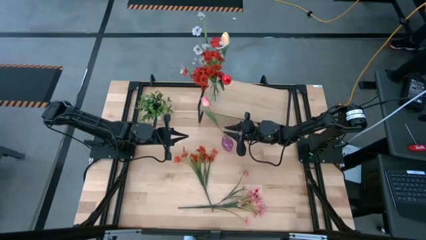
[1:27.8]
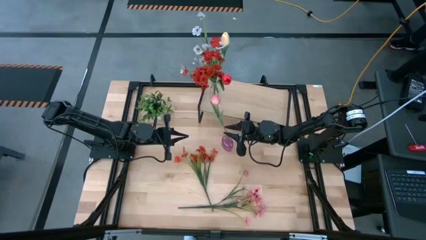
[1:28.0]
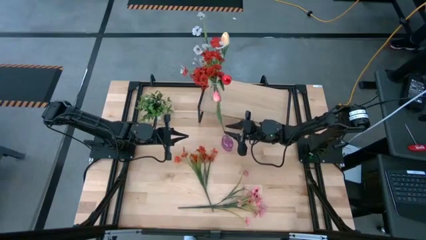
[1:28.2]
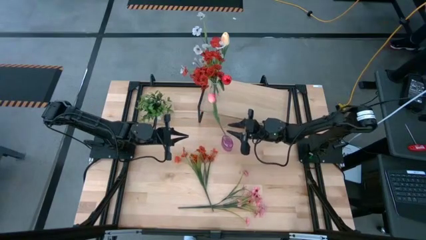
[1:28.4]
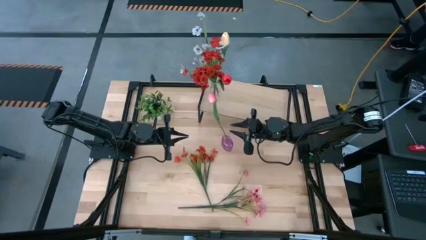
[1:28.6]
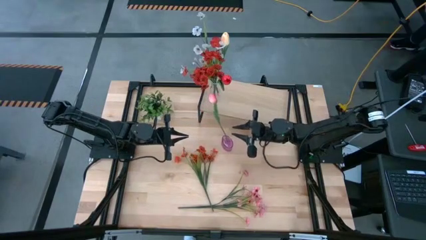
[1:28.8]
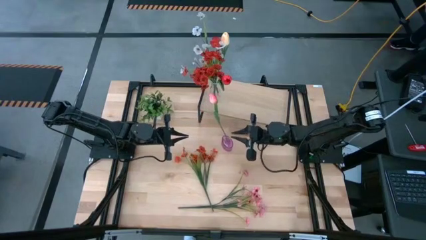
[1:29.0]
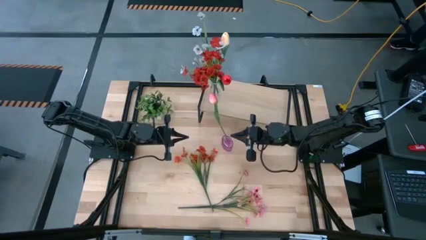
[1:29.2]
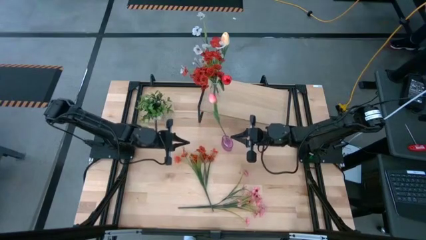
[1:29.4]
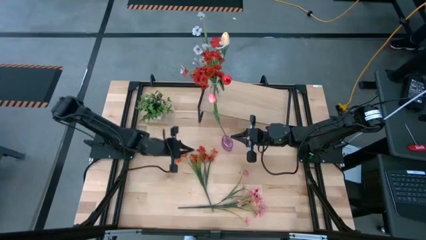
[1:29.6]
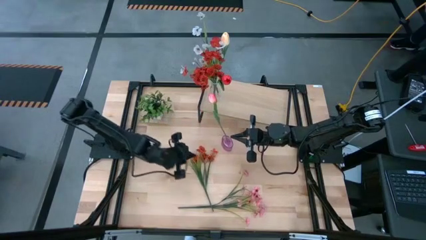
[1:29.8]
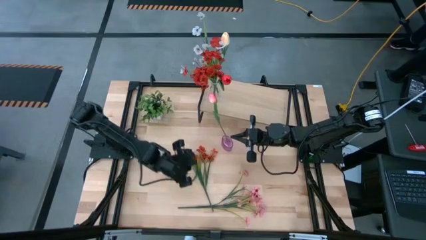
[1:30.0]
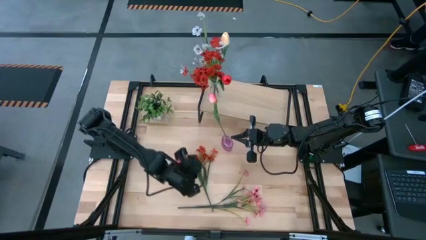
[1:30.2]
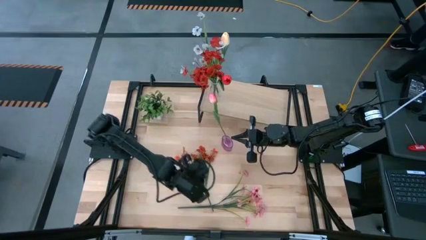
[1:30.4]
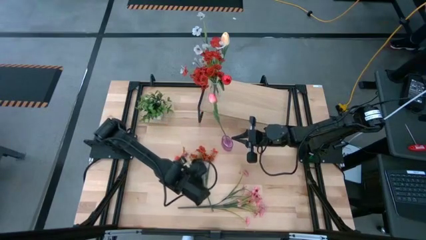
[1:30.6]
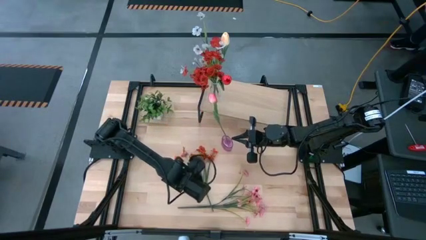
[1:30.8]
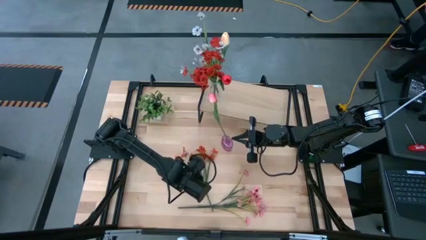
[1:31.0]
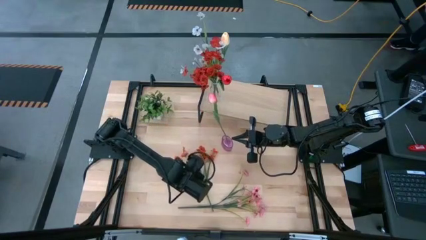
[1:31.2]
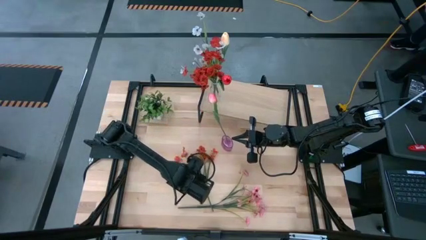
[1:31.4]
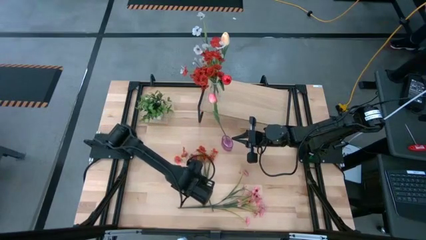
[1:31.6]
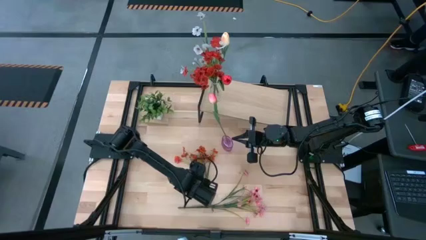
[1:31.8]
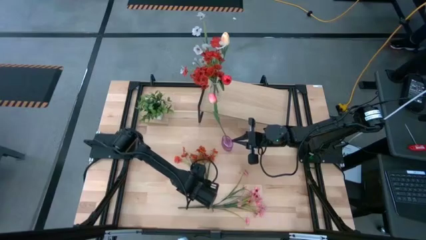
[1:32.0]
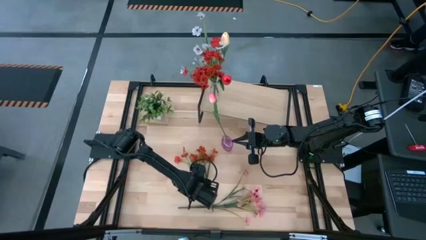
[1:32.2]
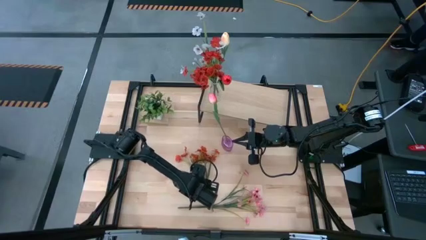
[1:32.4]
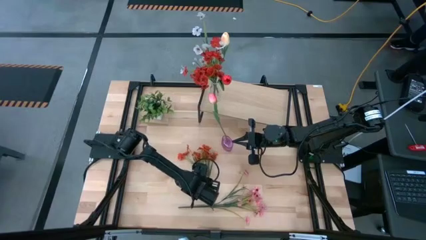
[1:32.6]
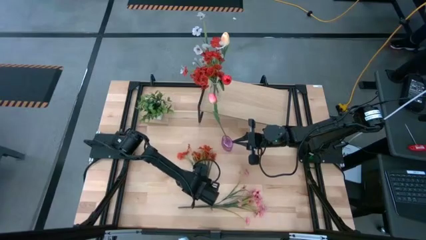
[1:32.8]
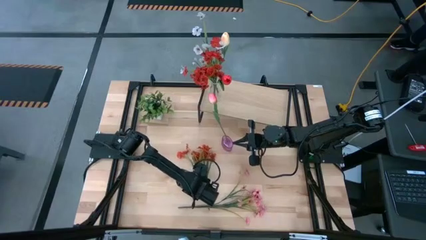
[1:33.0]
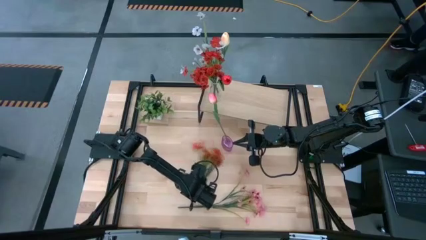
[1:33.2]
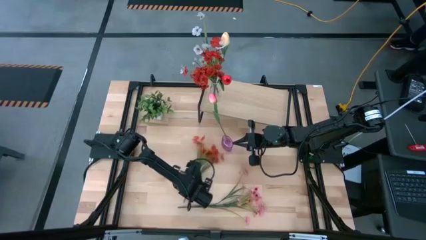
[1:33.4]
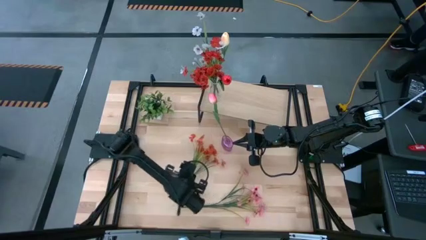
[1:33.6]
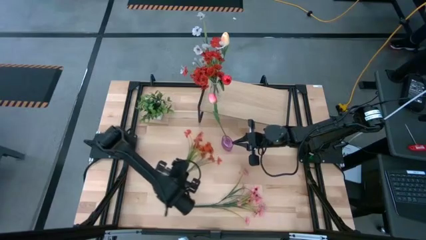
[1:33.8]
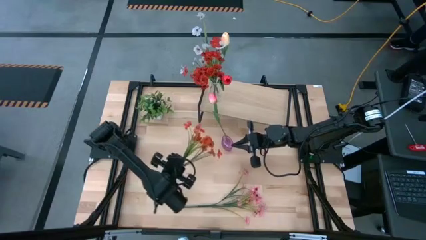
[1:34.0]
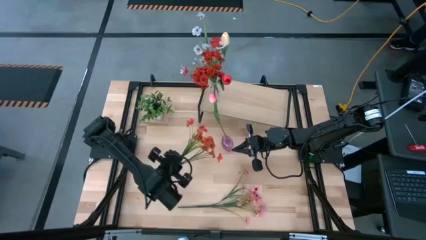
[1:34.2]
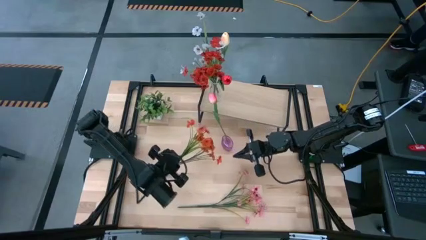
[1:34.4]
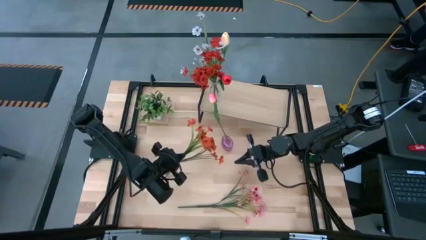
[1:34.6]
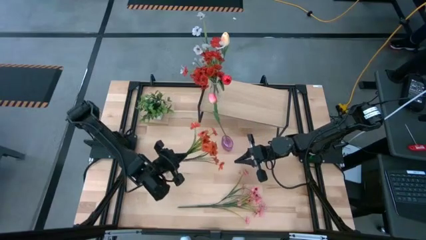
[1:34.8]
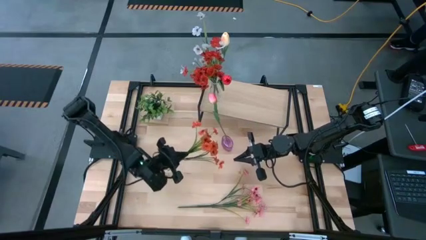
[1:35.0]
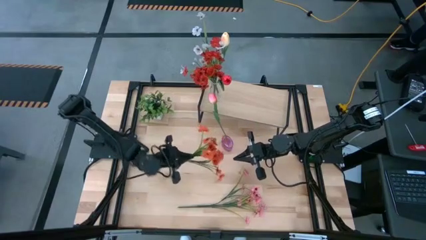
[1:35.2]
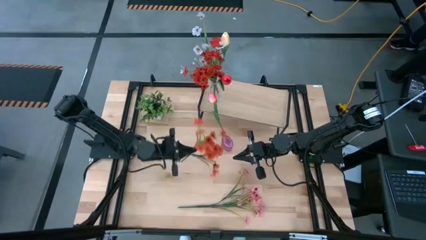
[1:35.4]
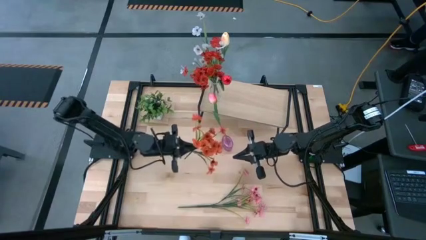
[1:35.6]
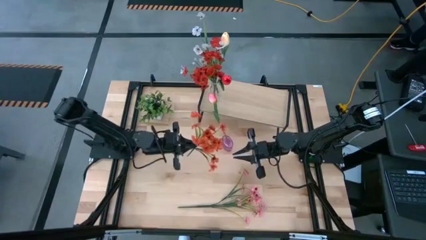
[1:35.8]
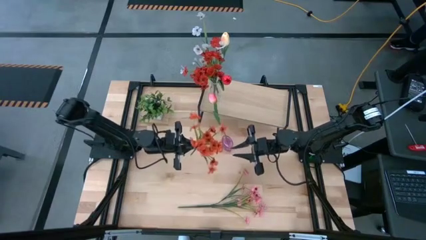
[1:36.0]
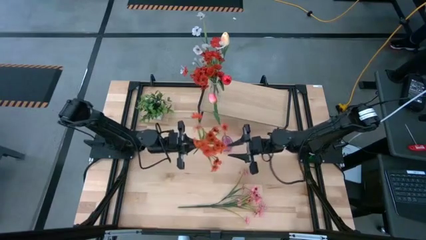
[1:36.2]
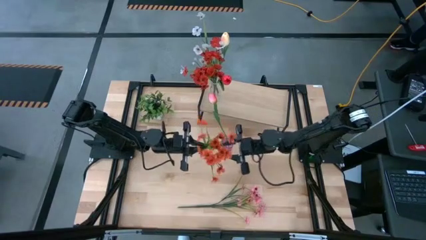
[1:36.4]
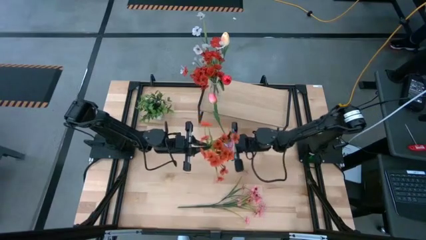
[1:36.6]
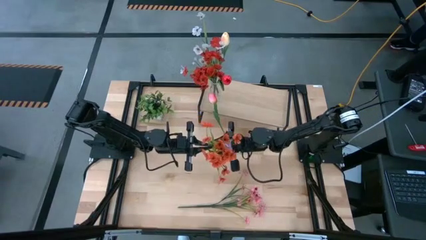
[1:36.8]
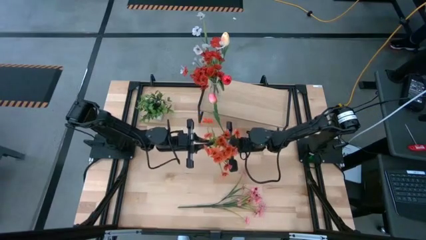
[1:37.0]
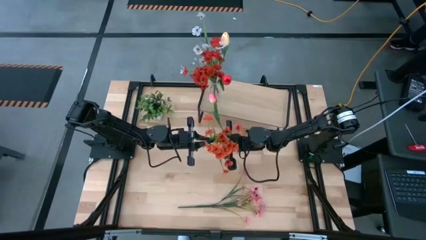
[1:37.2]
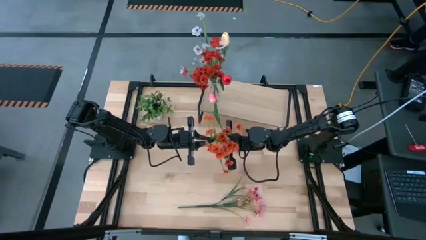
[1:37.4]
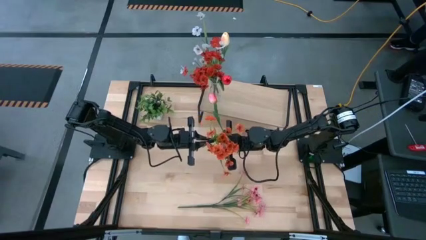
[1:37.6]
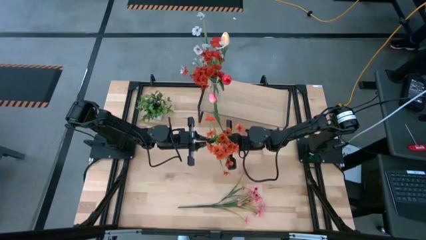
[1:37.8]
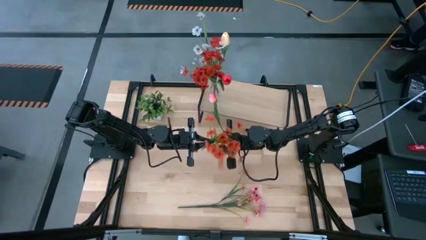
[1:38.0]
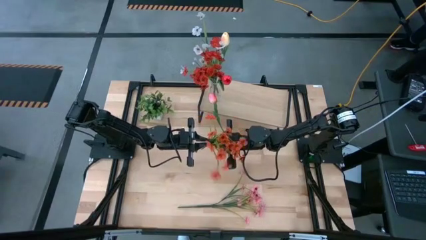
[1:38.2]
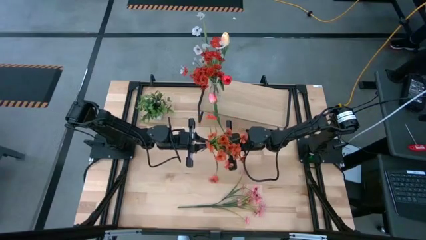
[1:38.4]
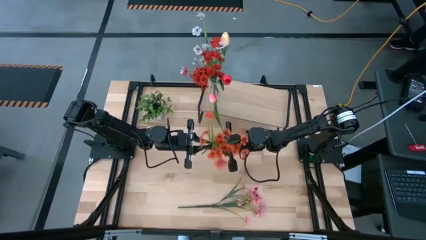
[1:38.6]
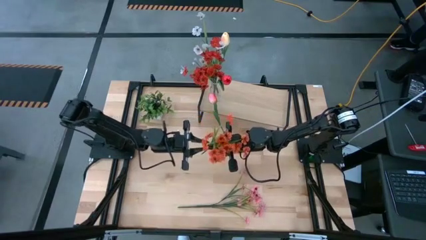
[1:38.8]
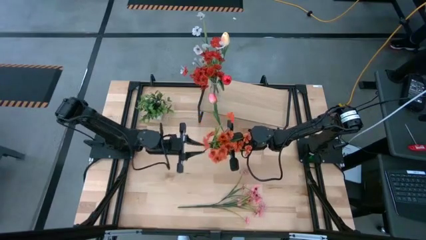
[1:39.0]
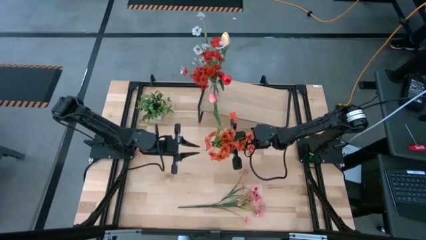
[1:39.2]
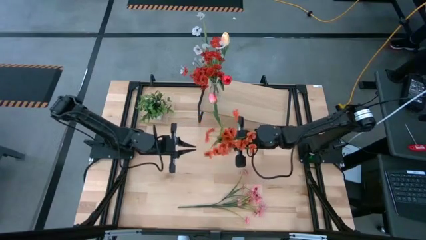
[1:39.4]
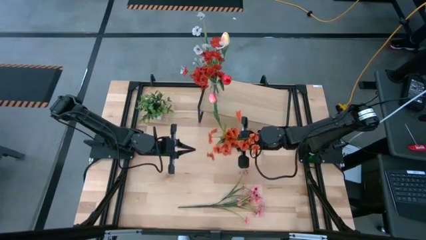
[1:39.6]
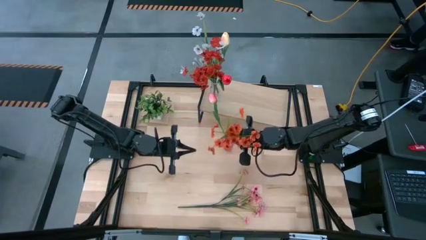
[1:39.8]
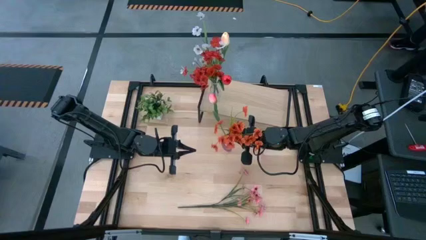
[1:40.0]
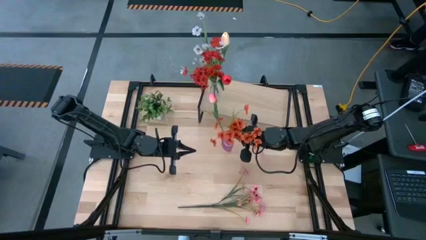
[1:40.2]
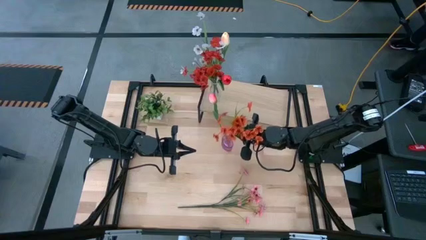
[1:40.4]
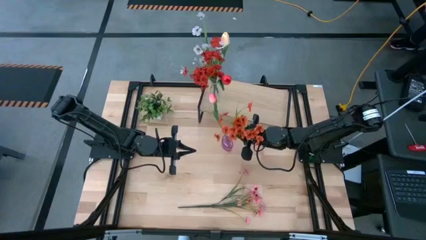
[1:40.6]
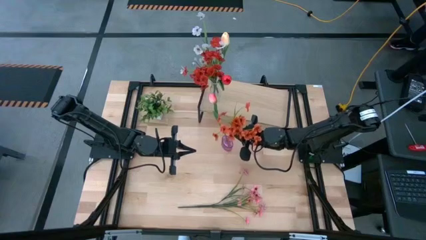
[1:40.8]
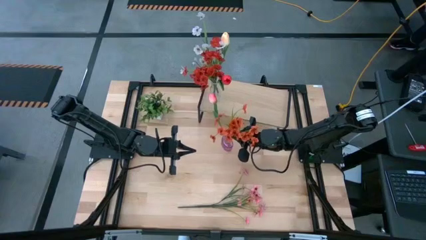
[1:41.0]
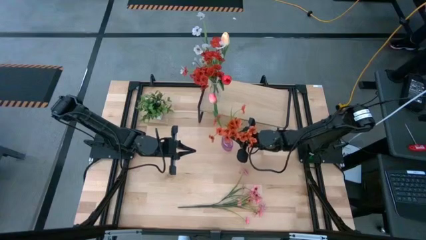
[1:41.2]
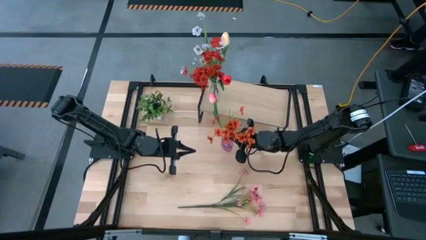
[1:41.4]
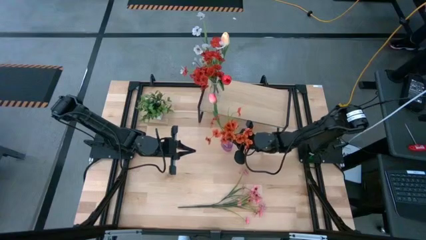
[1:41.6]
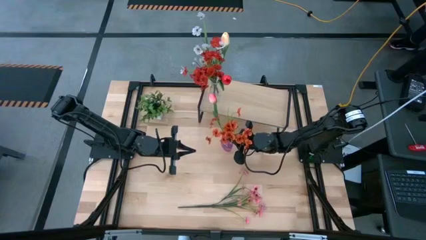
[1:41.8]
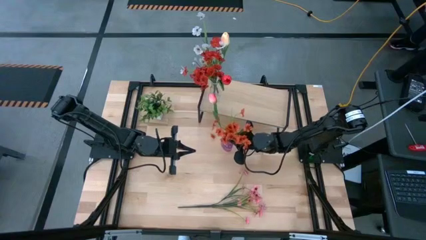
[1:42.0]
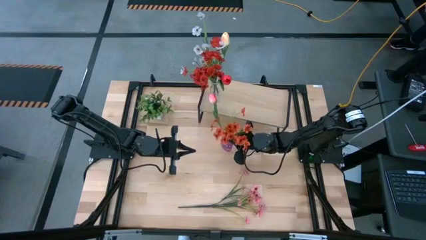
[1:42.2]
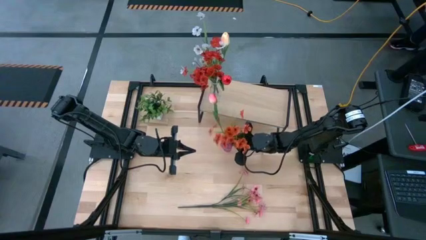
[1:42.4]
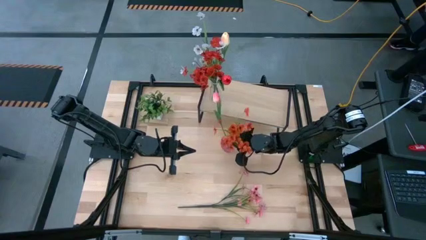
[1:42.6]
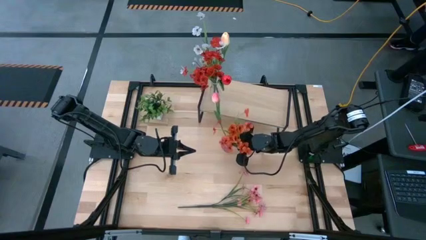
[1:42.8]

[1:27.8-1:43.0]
Task: Pick and place flowers into a vace then onto a shelf
Put the orange flowers into the purple vase

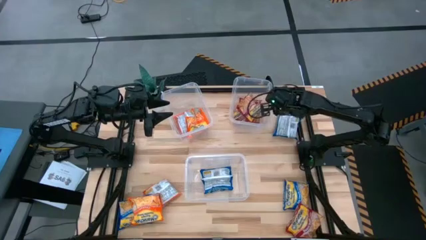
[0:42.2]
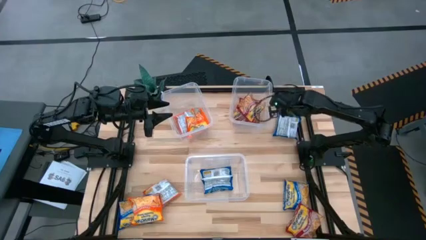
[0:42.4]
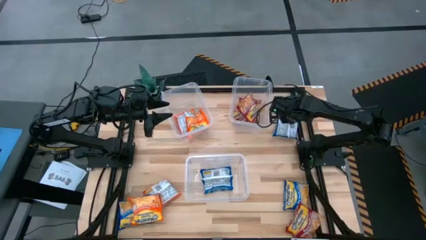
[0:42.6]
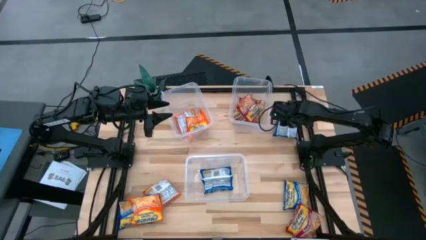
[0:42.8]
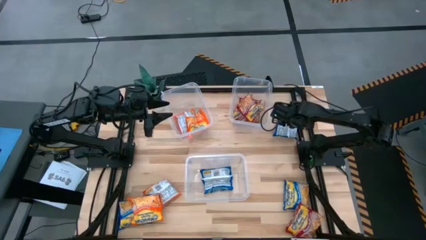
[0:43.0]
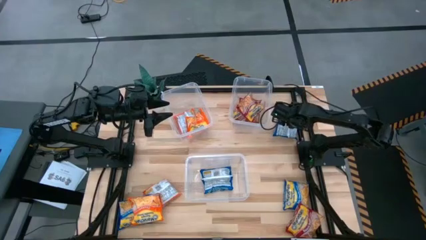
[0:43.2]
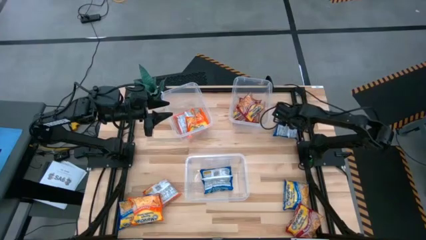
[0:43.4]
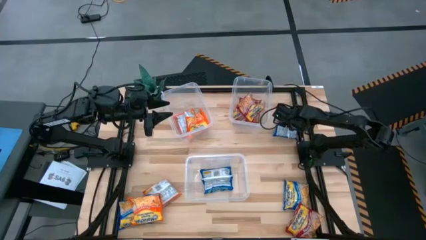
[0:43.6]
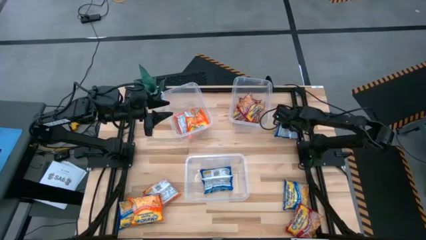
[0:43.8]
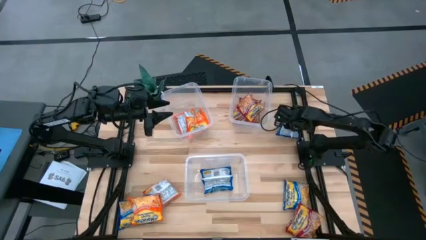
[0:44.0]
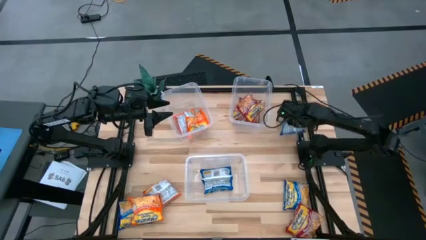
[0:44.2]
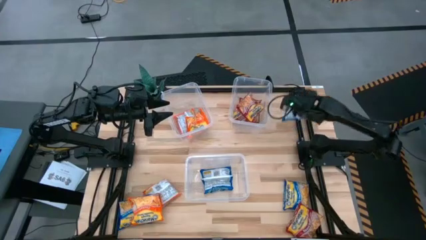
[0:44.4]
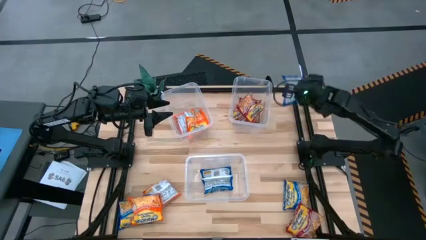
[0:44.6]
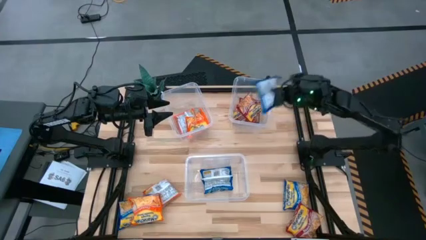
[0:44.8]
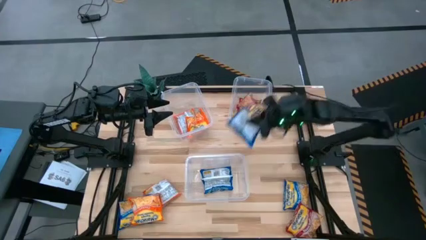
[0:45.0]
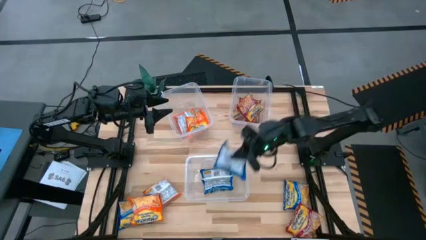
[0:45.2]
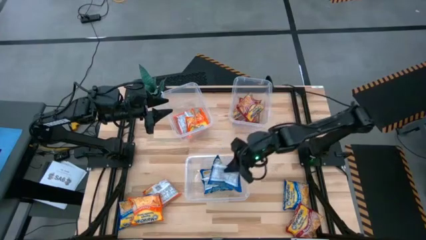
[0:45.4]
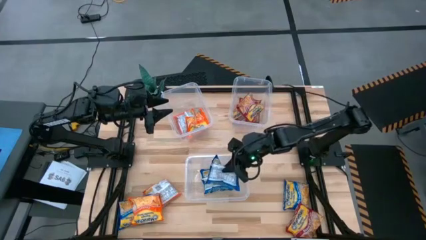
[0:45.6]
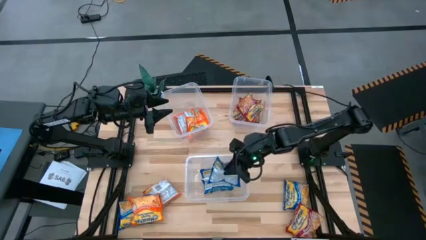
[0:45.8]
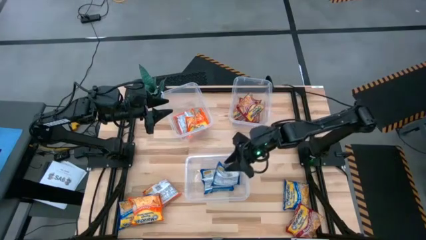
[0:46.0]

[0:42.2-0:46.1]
Task: Sort Maruchan noodles
Put the top blue bag into the bottom transparent bin
